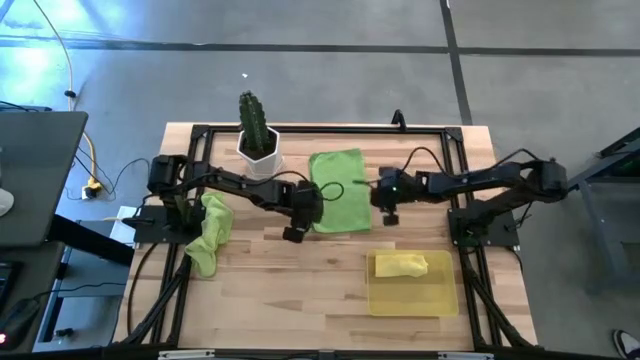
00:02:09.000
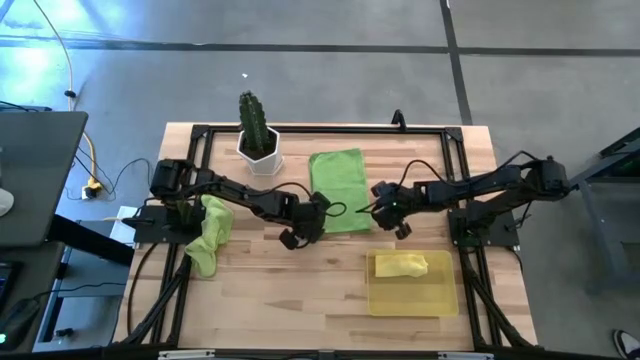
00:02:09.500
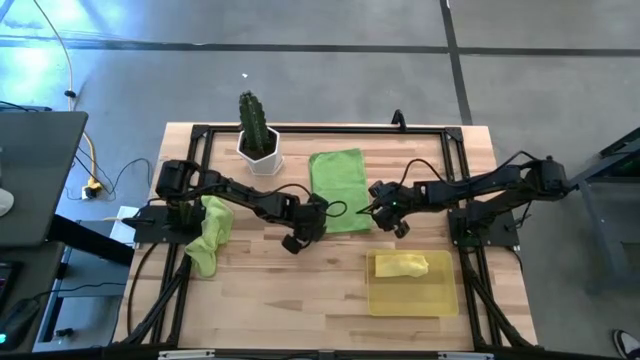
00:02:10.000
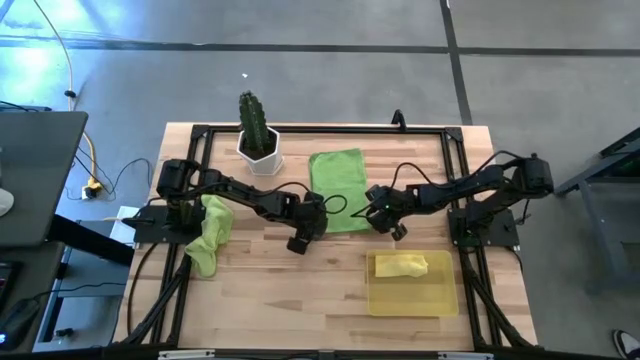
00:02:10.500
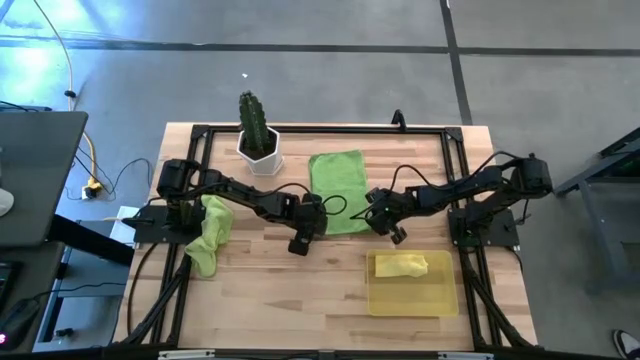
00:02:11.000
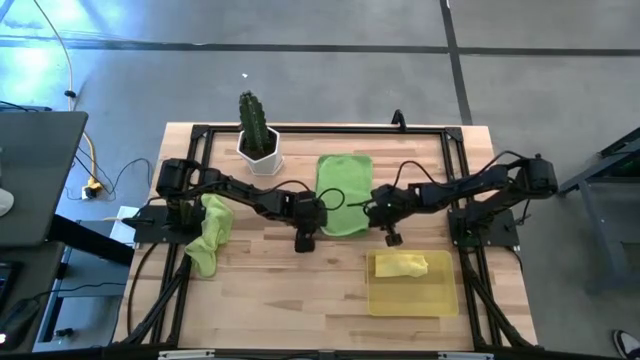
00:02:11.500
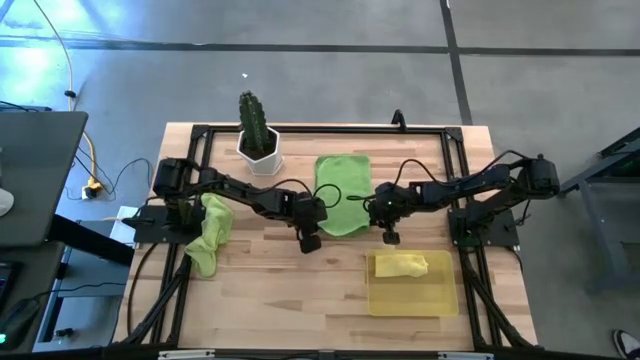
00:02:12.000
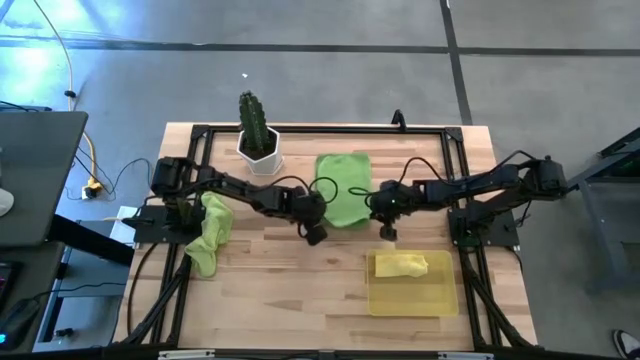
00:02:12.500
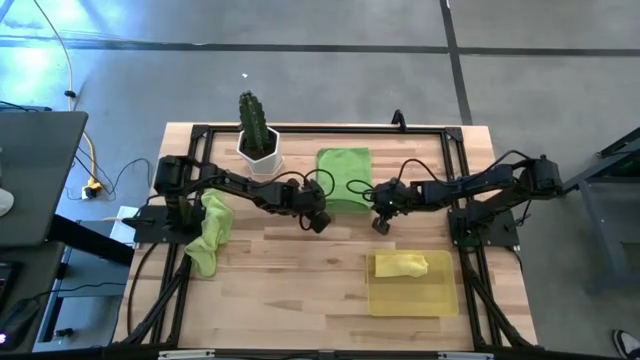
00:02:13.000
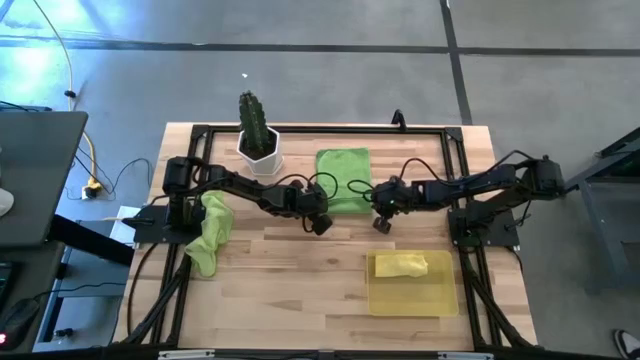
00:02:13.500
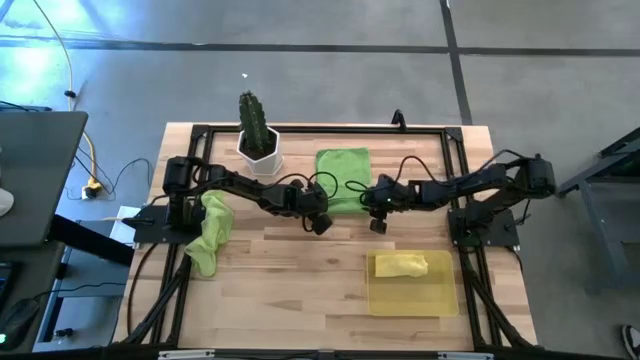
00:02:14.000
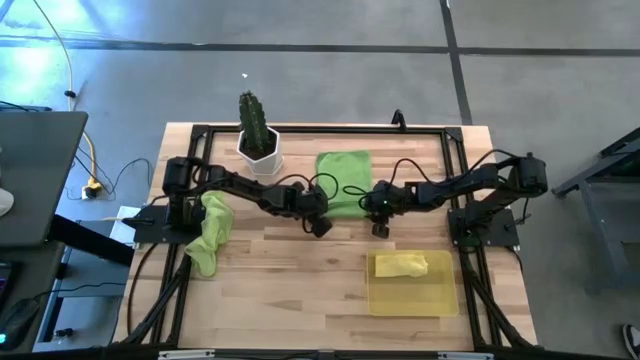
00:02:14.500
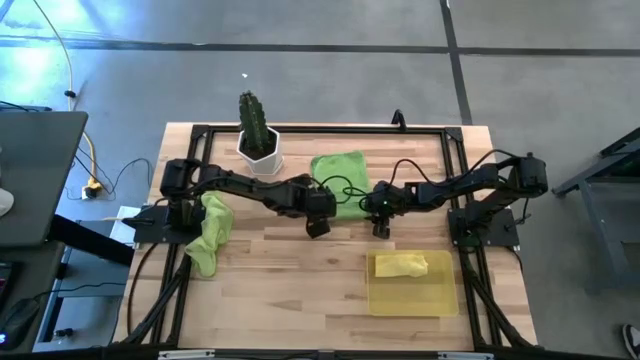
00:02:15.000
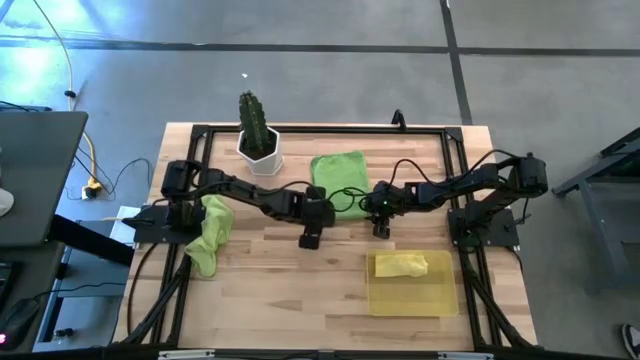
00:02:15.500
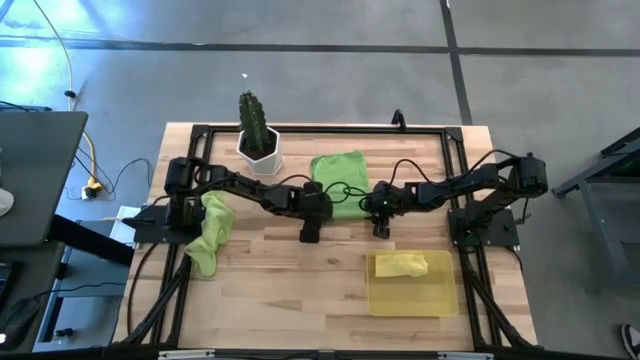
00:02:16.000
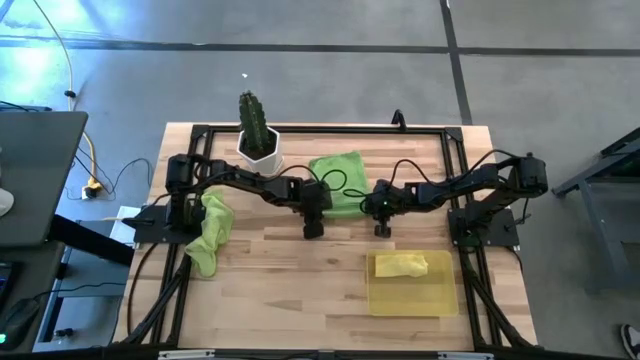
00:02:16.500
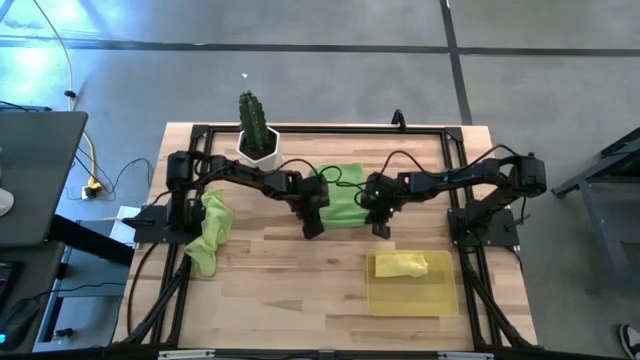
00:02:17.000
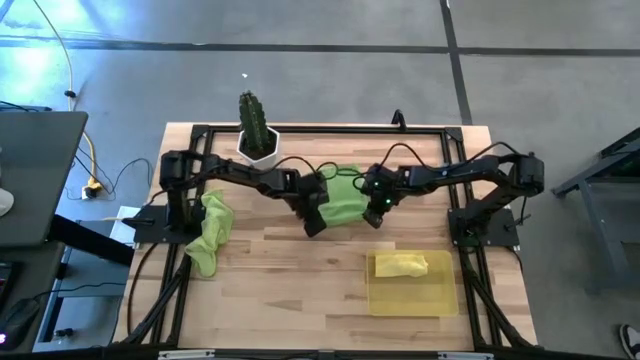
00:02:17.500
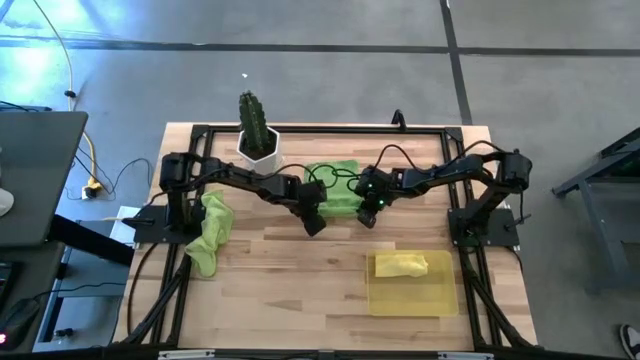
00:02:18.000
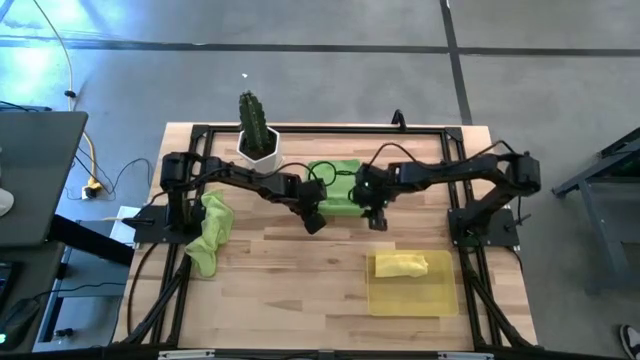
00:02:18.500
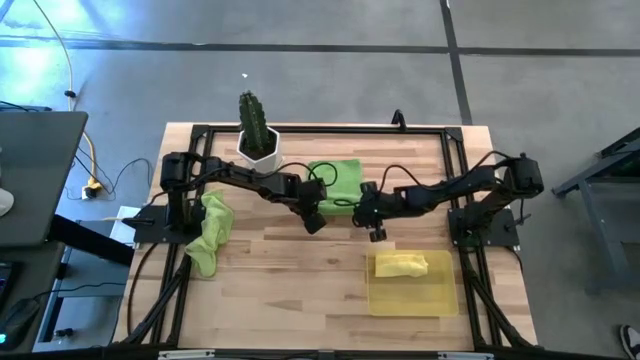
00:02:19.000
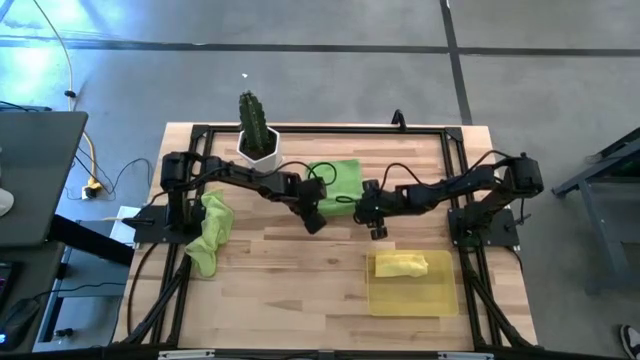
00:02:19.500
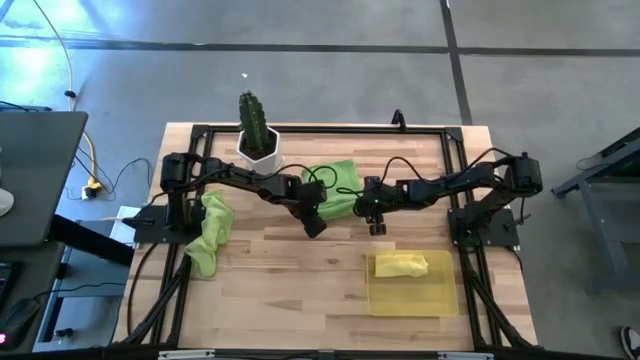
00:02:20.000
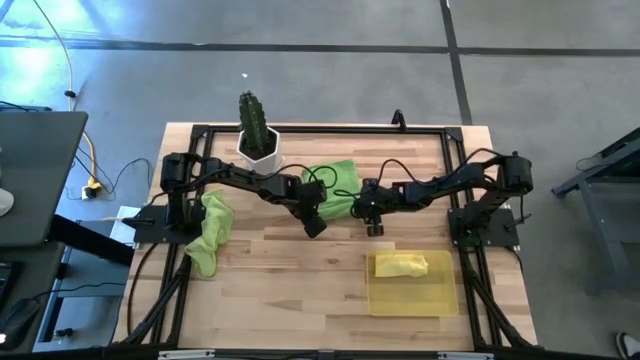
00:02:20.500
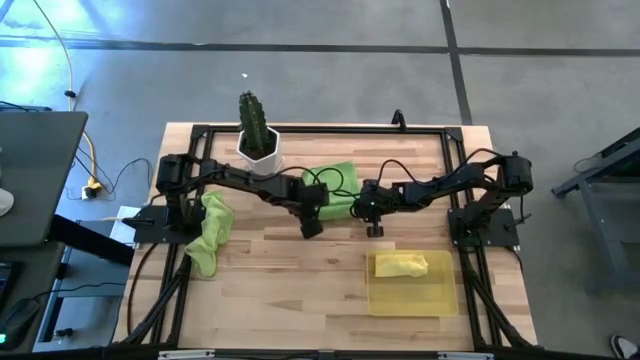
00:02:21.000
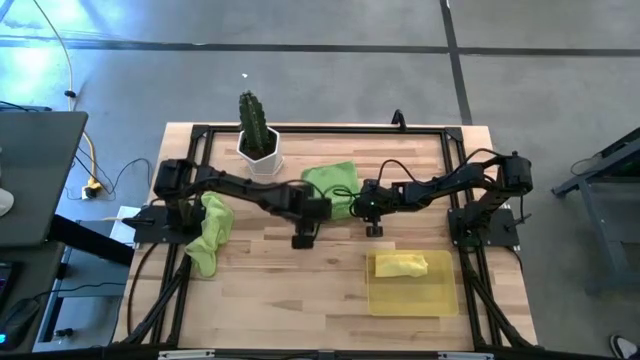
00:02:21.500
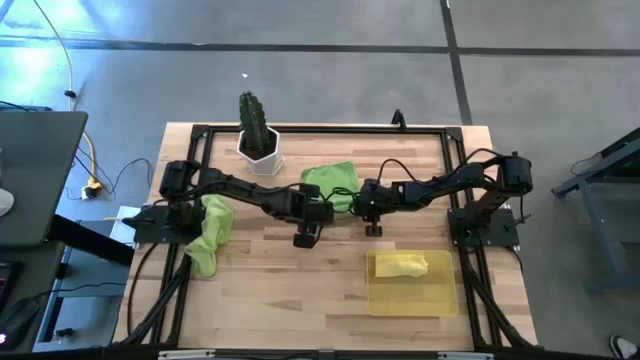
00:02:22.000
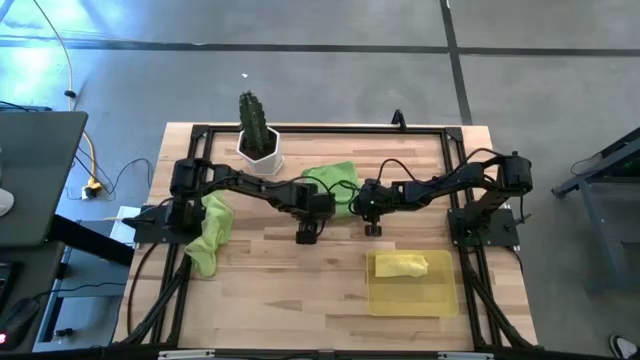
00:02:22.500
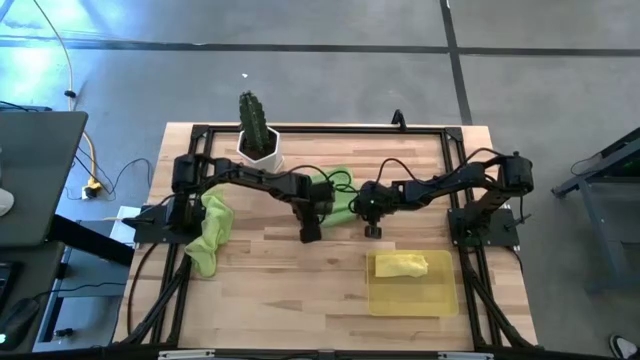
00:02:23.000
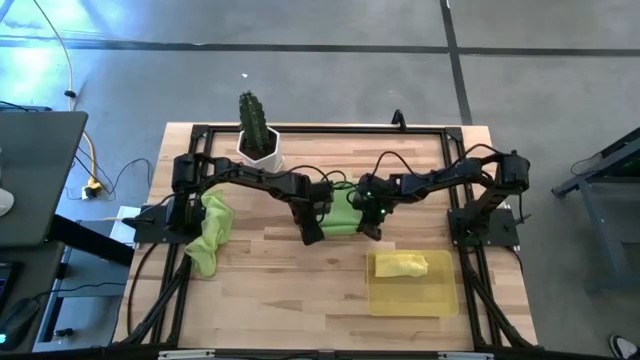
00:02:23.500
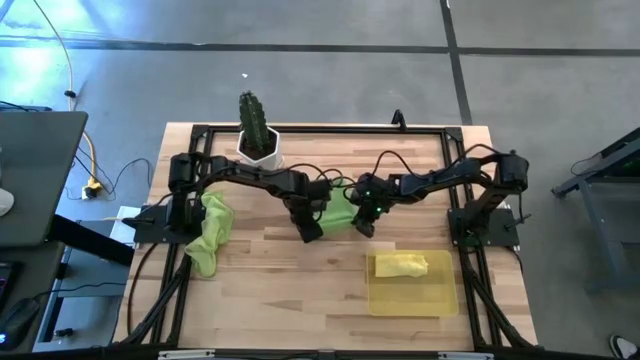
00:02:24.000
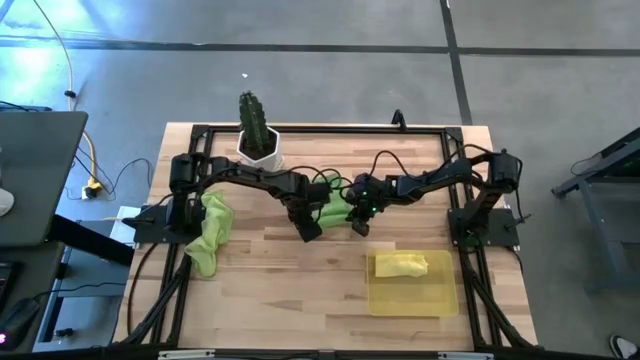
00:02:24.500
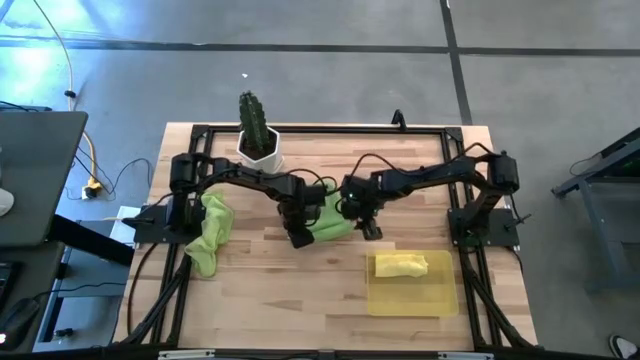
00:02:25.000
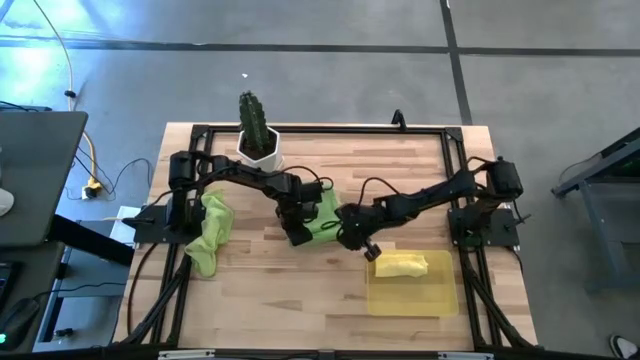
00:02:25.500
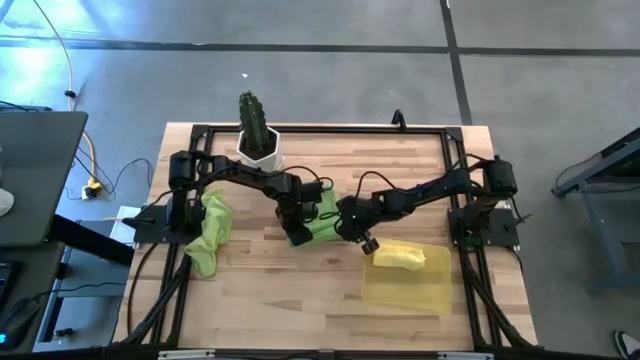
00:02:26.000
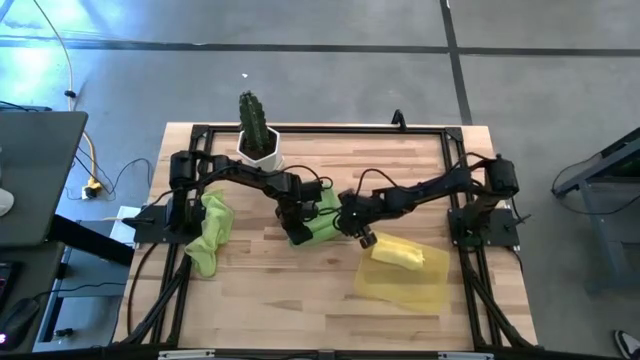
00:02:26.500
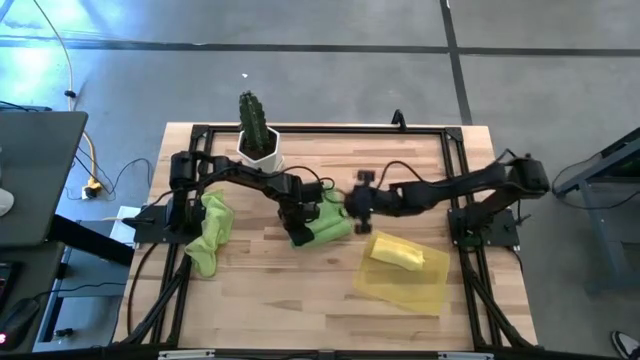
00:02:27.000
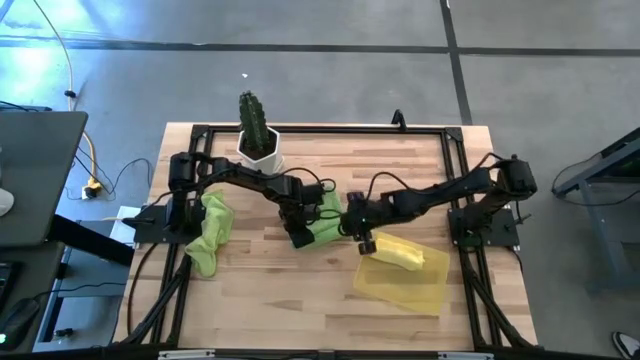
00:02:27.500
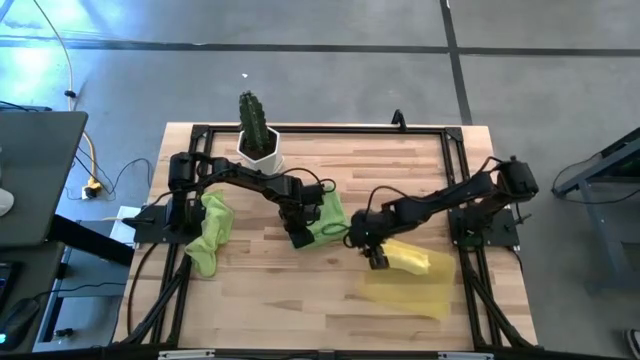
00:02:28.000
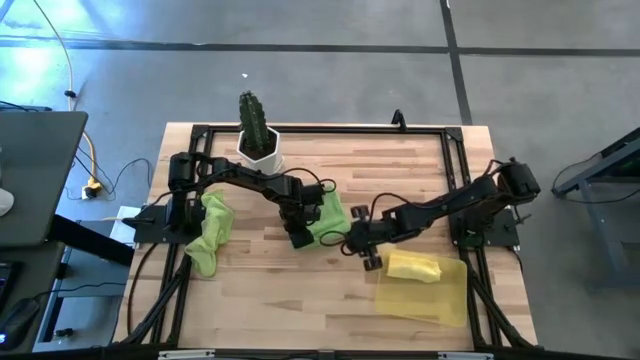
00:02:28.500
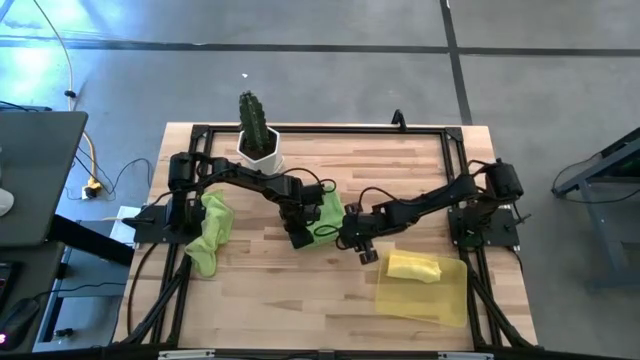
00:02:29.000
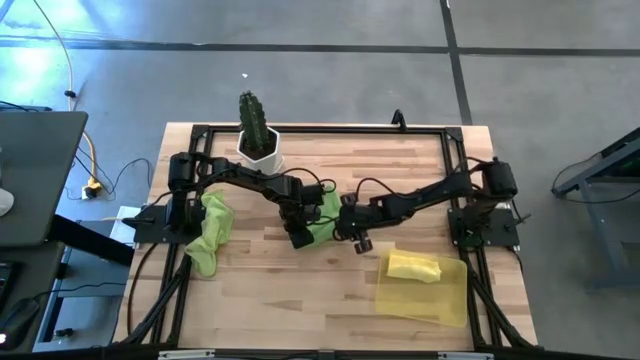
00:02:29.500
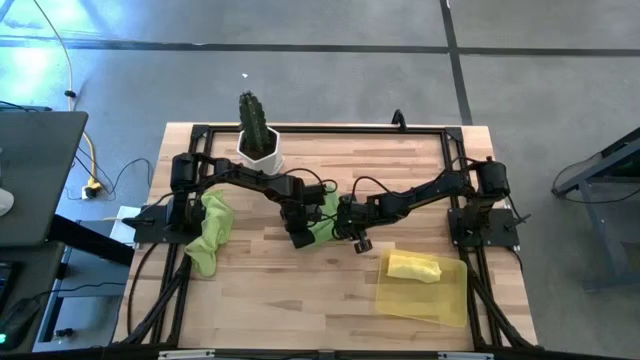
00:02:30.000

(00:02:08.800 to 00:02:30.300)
Task: Roll microfiber towels into tight, uniform cylinder then place into a basket
Roll the green towel
